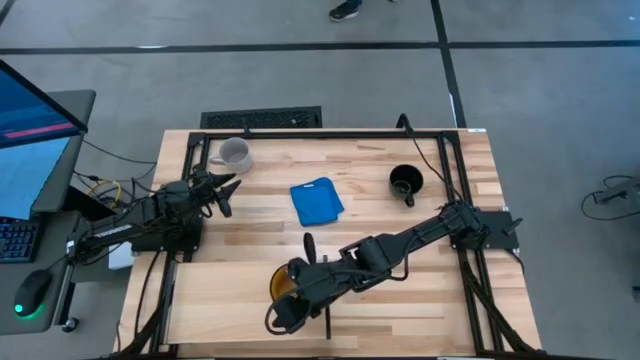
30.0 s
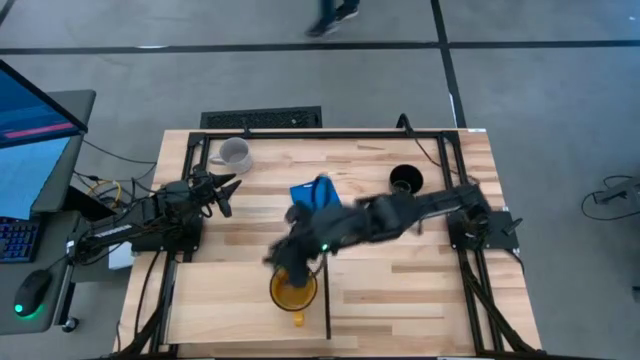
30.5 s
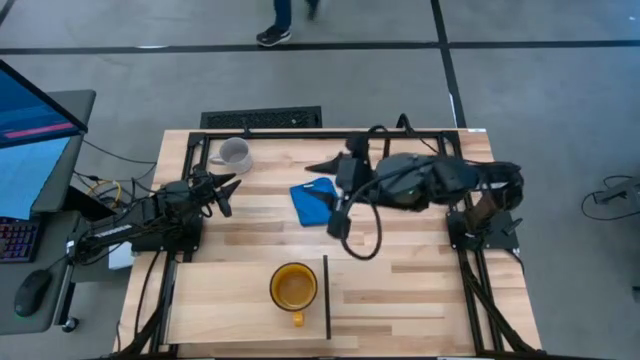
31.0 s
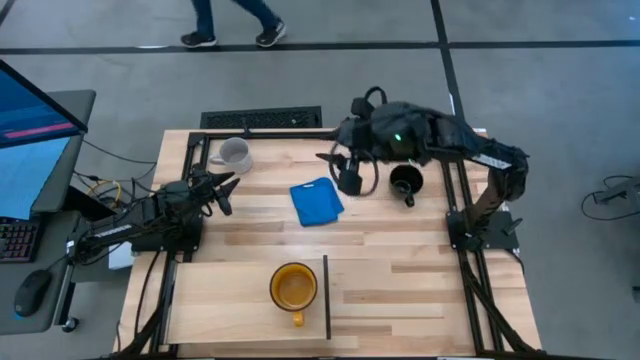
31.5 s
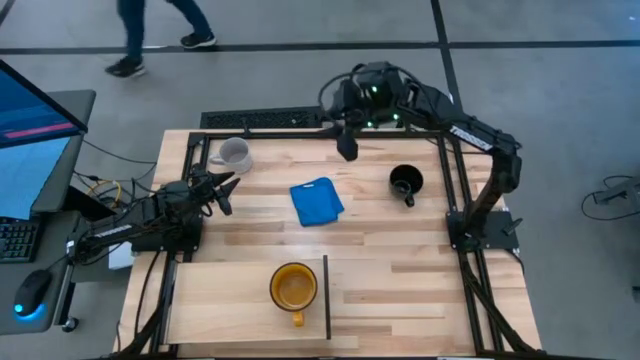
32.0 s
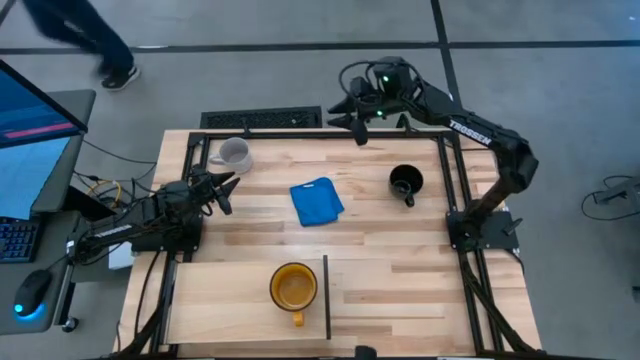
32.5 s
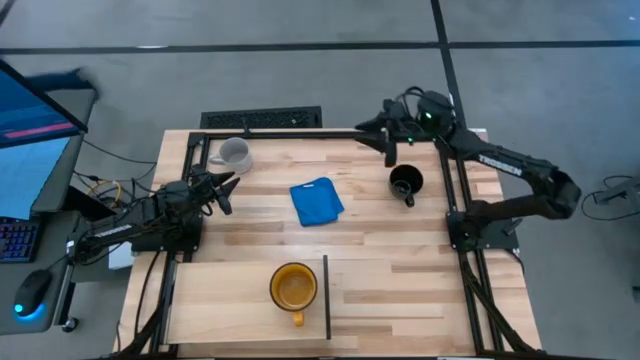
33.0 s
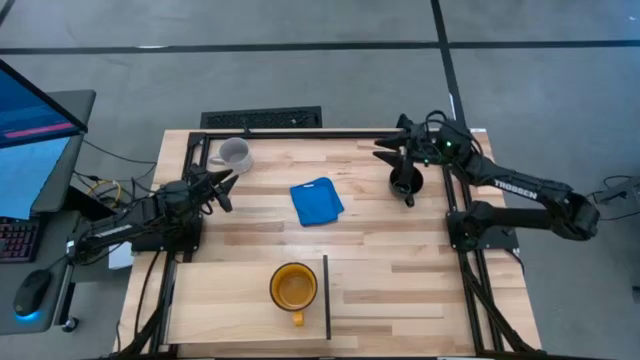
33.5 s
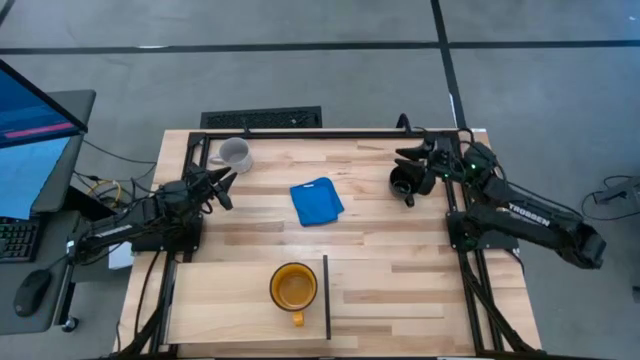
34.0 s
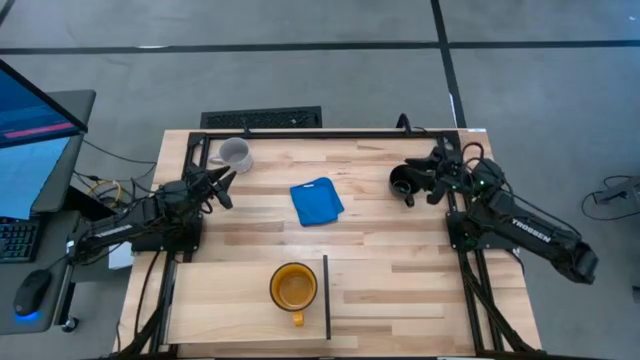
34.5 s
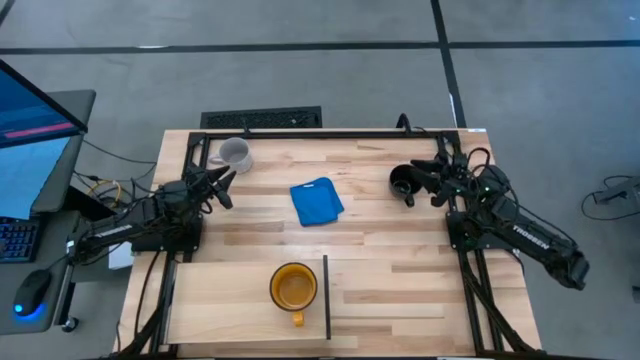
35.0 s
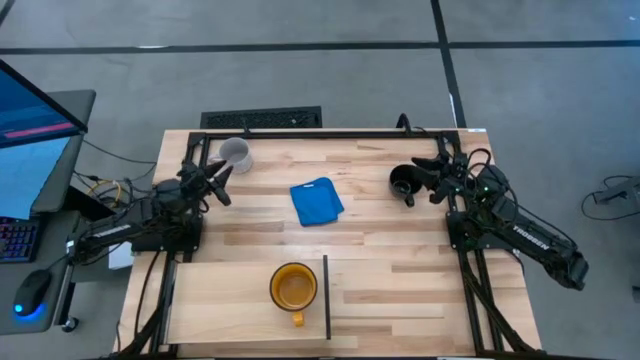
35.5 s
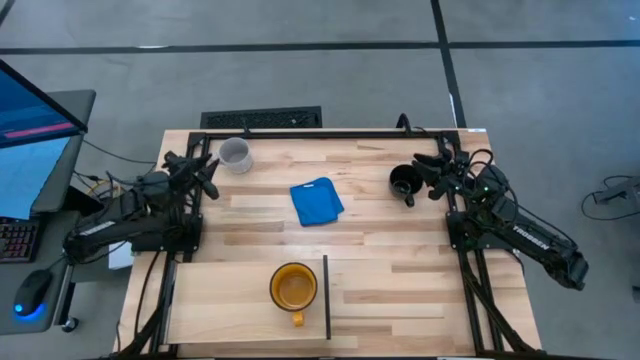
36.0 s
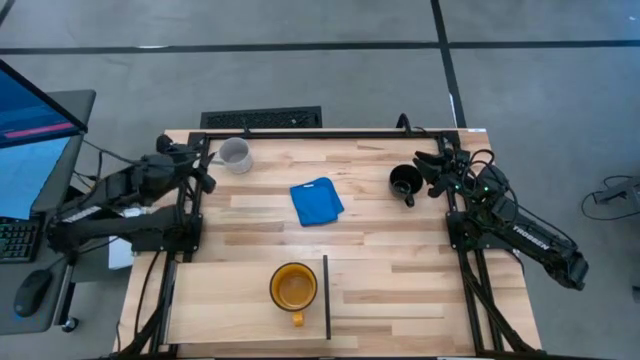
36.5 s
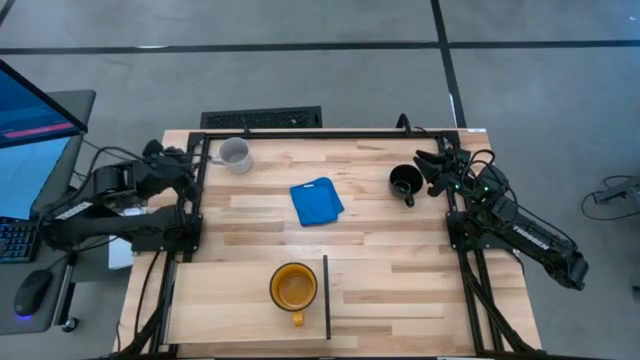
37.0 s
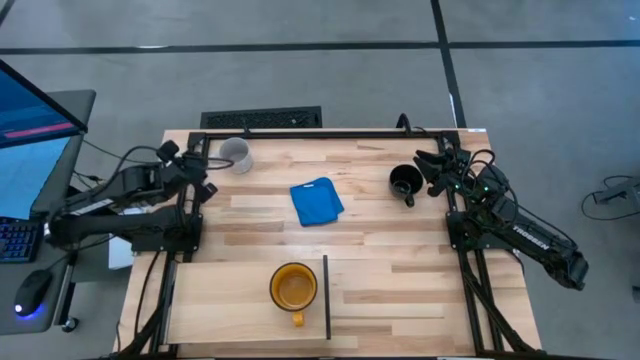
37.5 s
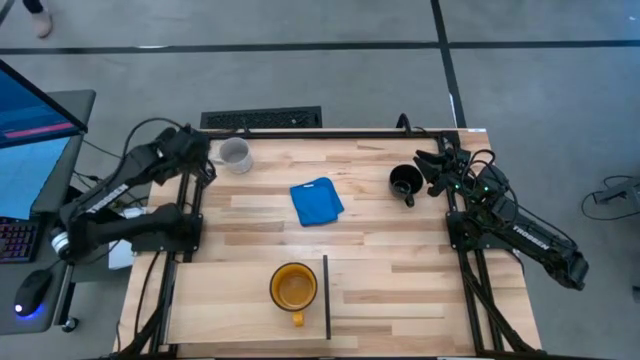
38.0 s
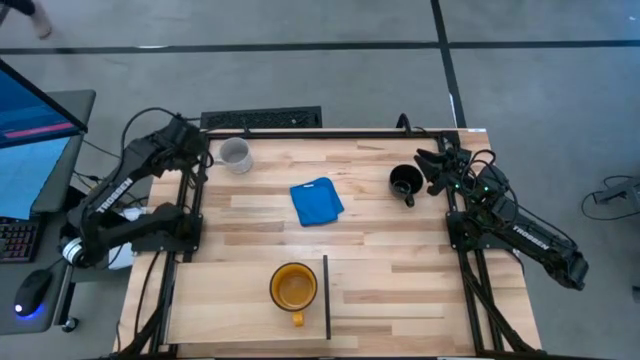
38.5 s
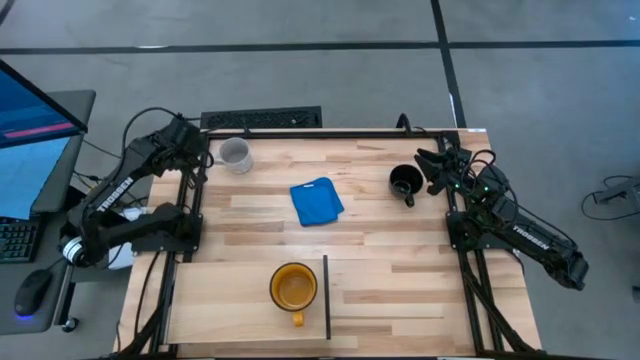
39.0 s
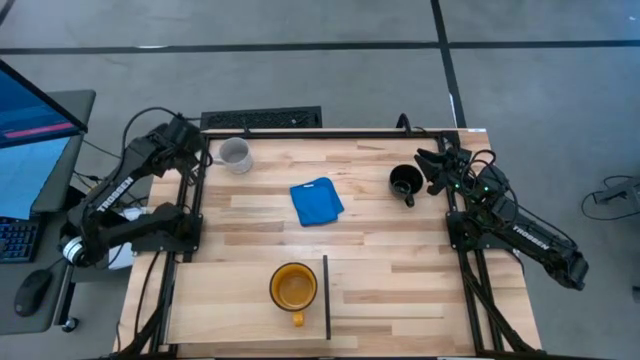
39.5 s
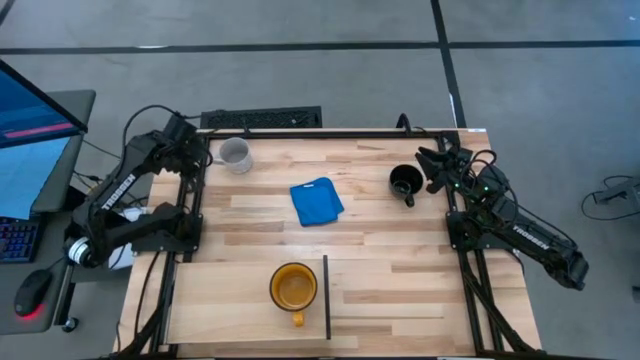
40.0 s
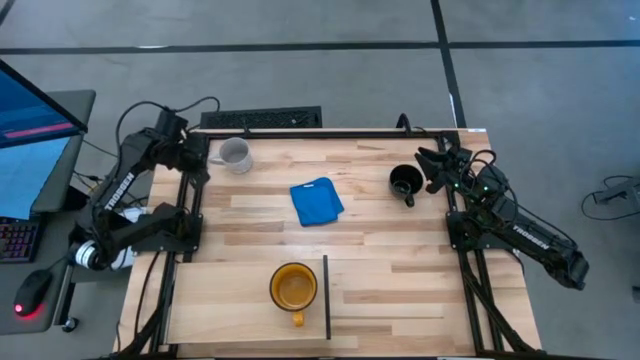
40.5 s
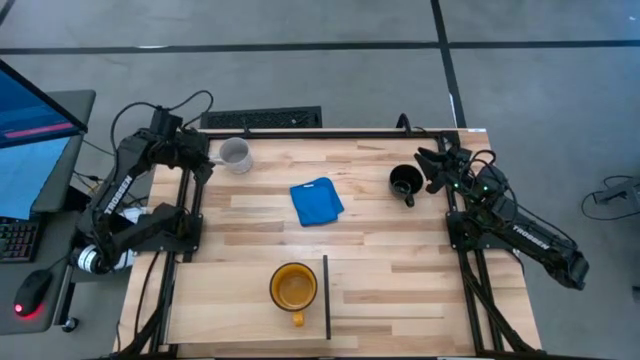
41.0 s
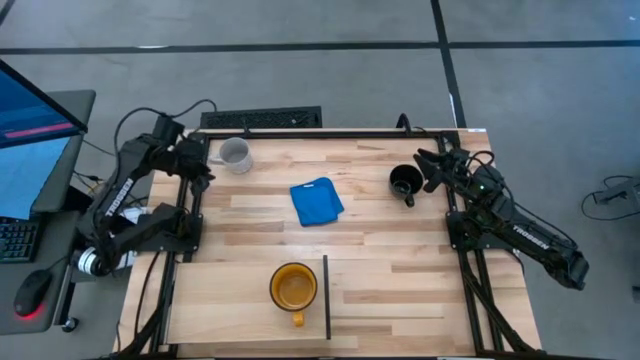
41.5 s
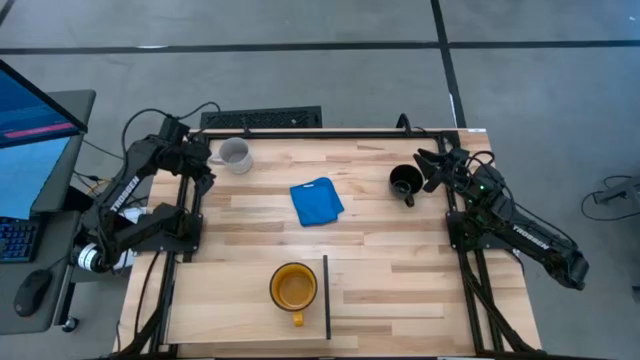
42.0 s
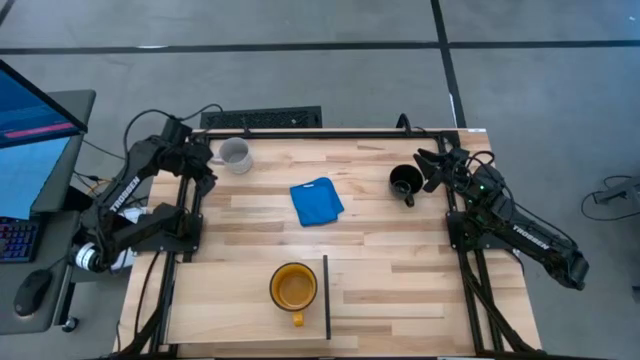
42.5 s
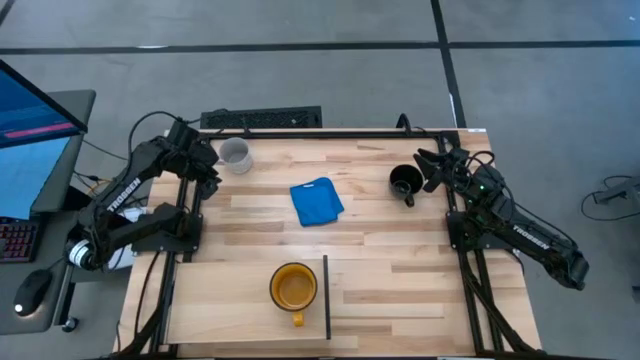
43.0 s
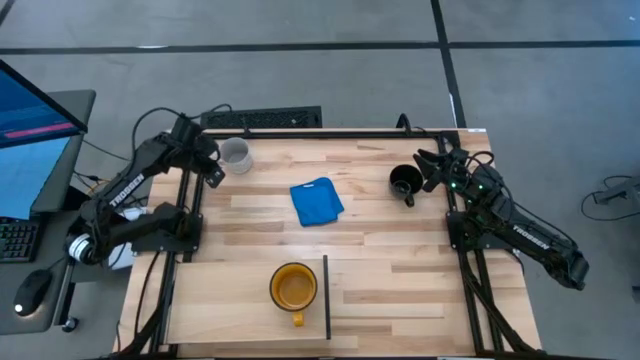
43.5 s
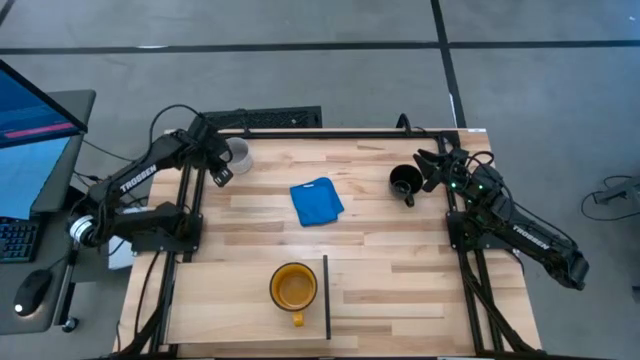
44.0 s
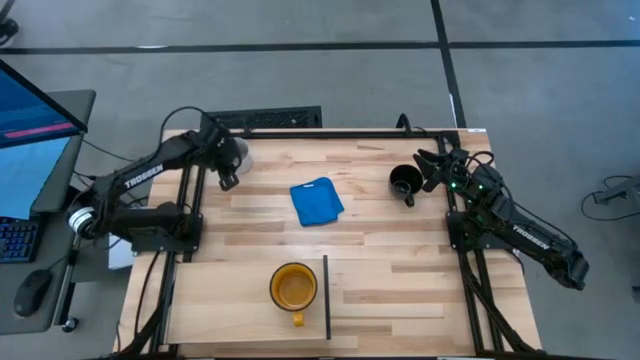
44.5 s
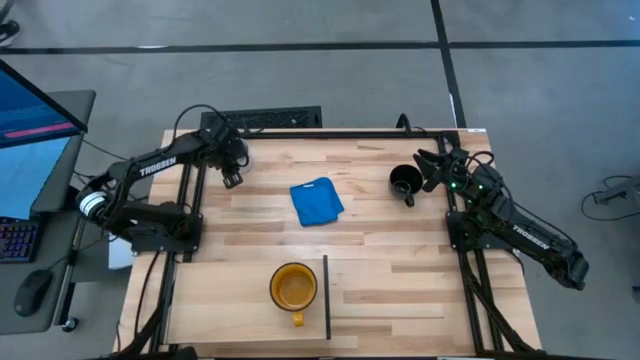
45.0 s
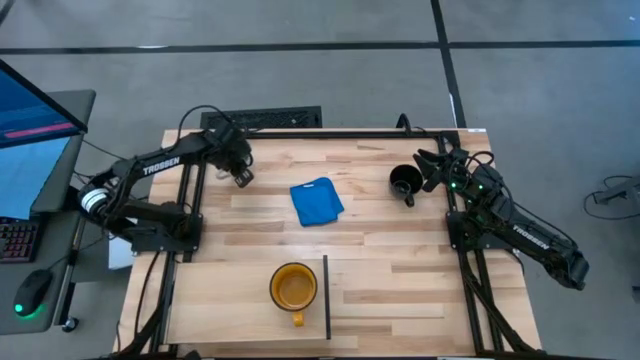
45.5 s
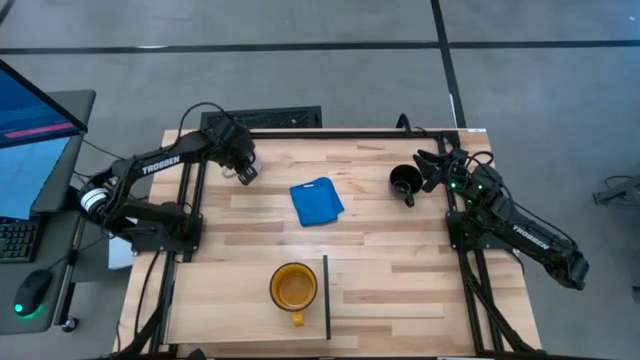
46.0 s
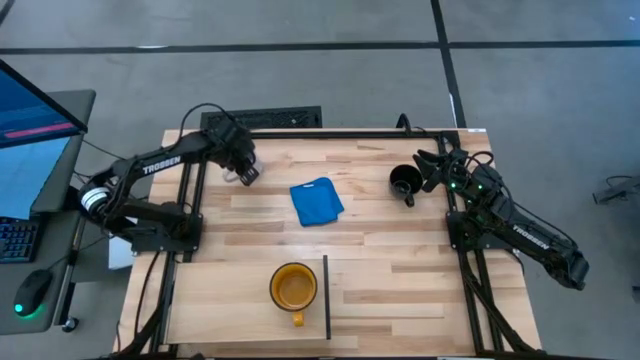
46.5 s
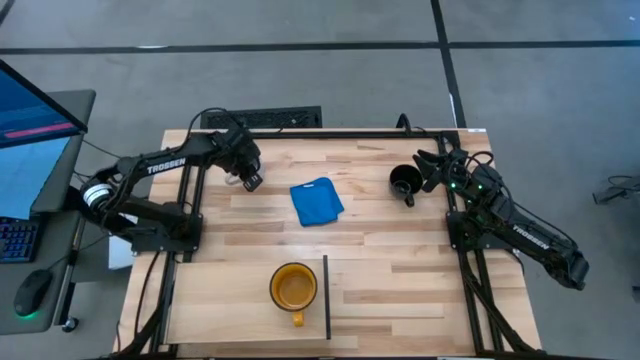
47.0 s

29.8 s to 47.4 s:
Task: Stack small to large cups/mugs on shelf
Put the gray mug on the shelf

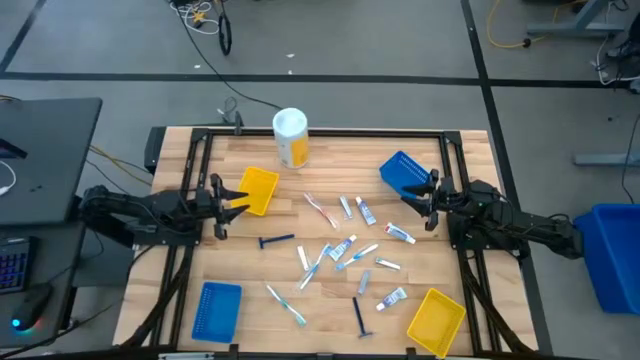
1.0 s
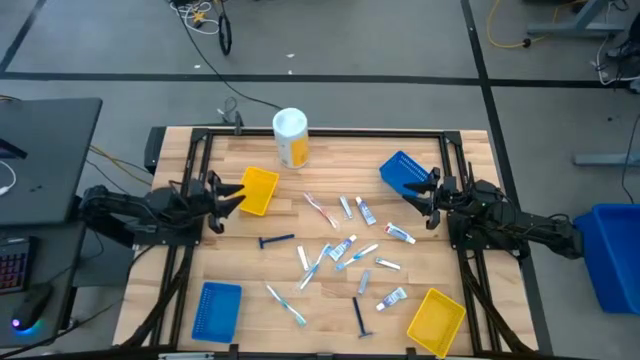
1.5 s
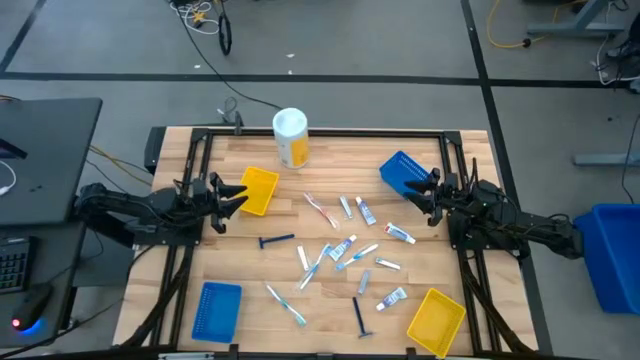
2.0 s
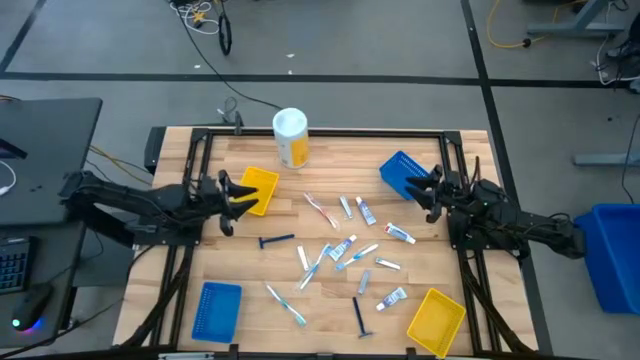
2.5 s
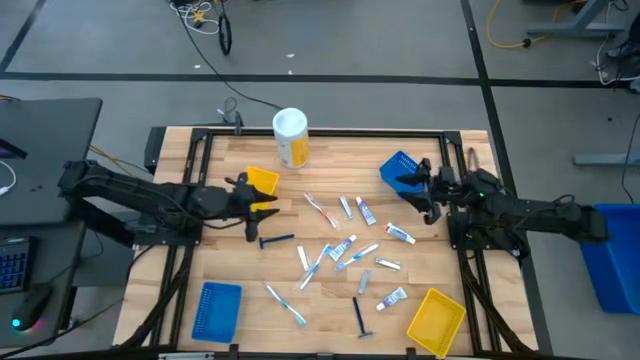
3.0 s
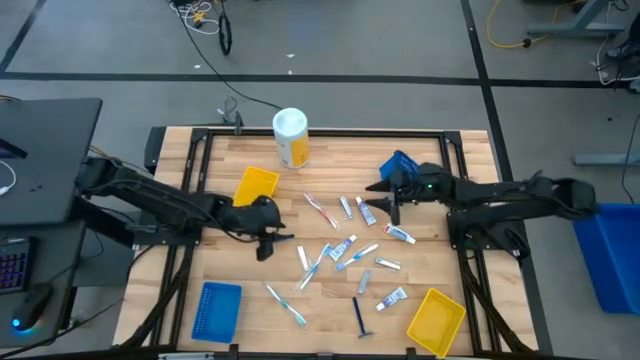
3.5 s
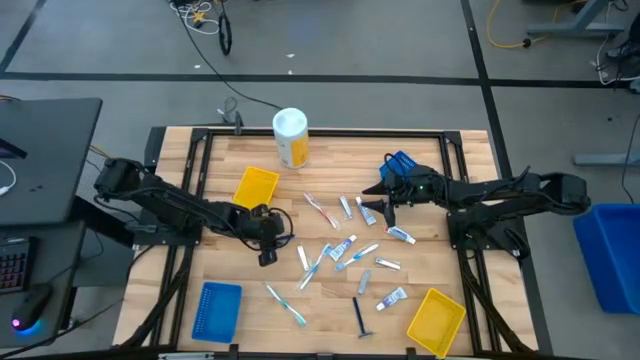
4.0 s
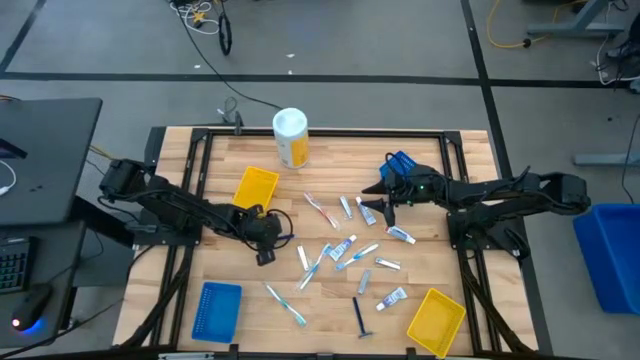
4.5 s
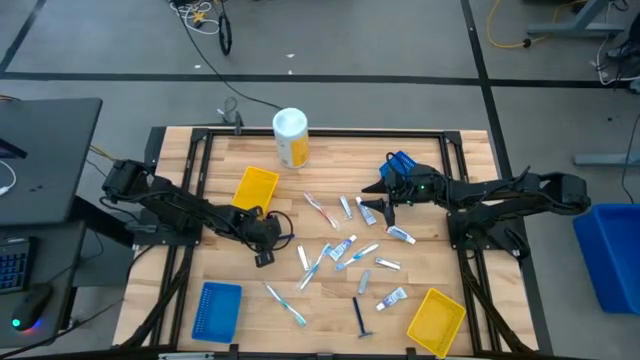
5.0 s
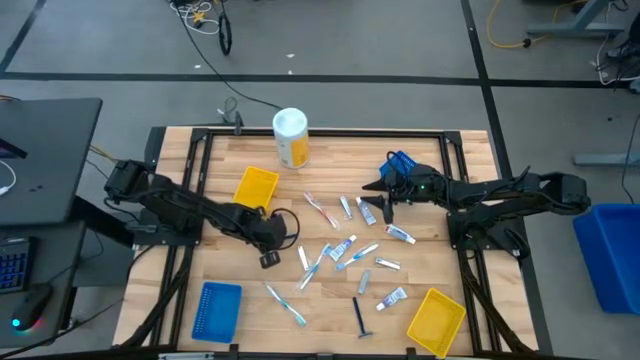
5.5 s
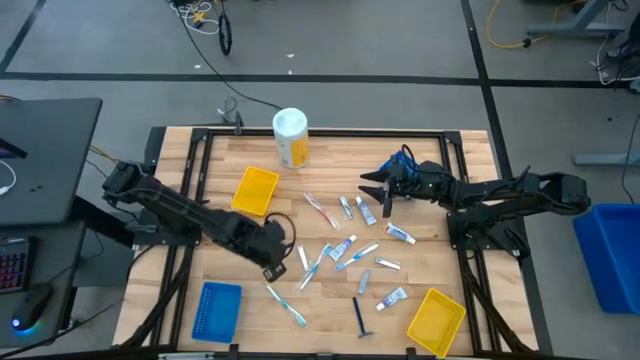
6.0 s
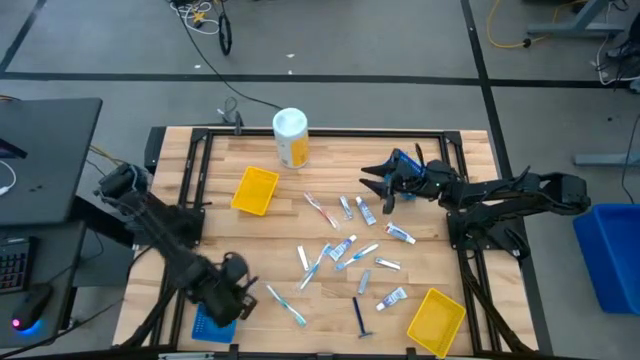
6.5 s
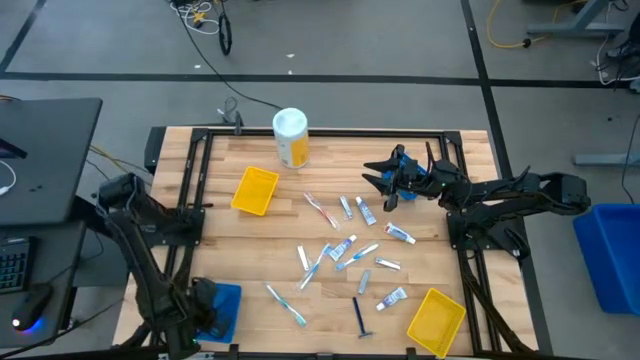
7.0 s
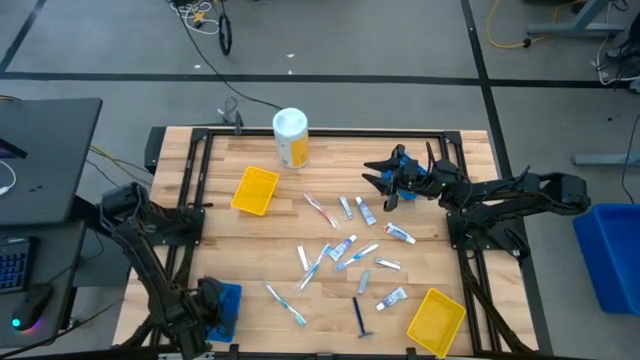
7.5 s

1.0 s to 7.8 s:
Task: Pick & Place Travel size toiletries
Put the blue razor into the bottom blue bin
